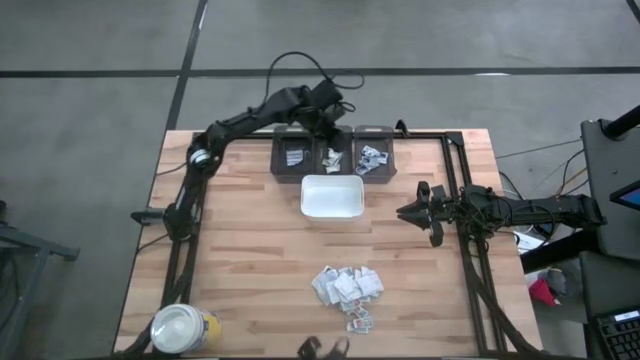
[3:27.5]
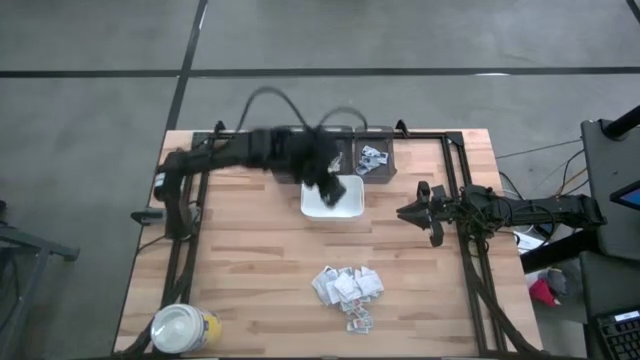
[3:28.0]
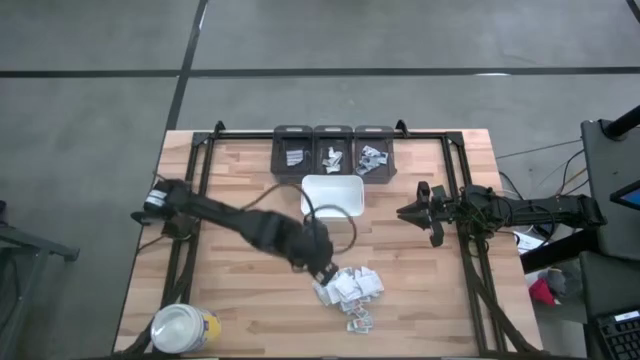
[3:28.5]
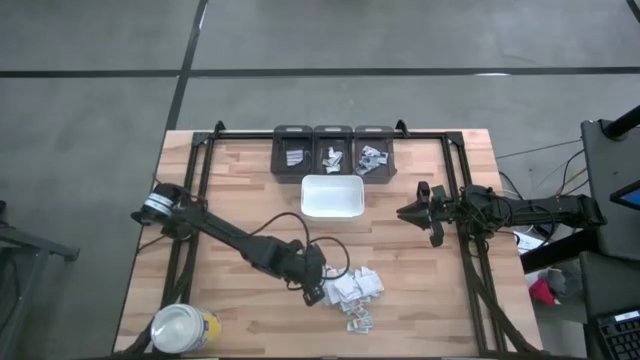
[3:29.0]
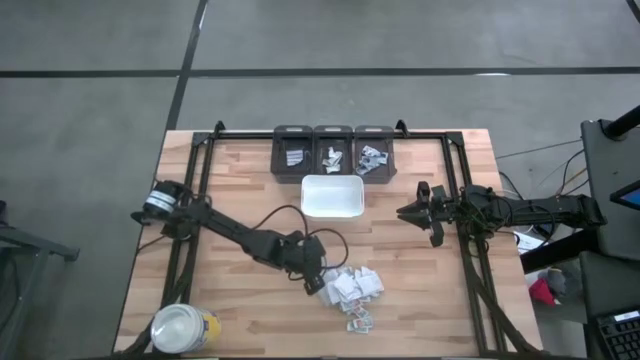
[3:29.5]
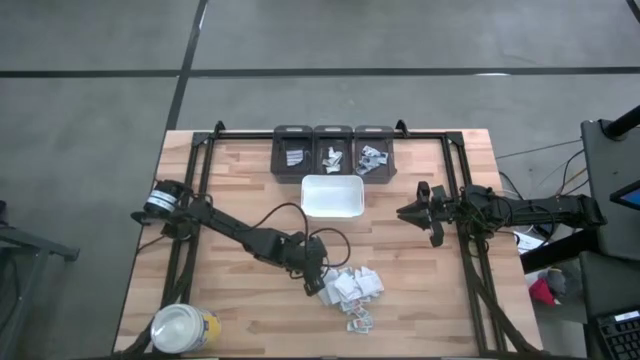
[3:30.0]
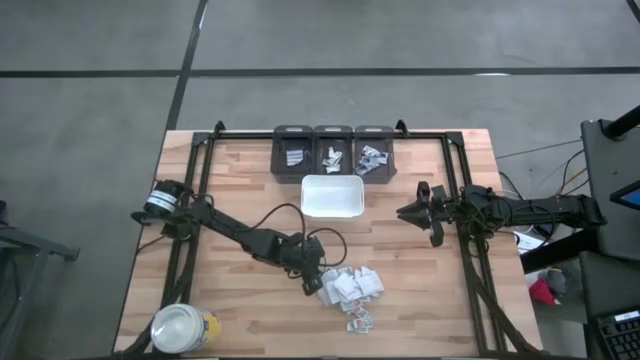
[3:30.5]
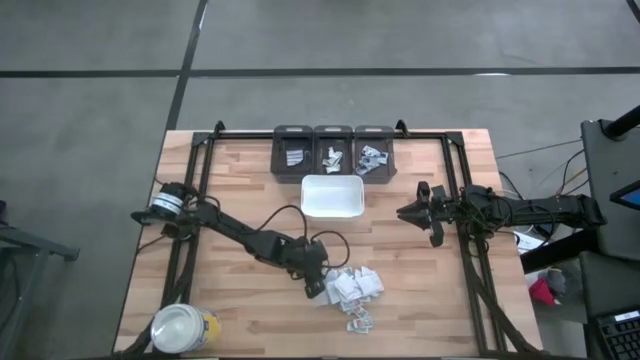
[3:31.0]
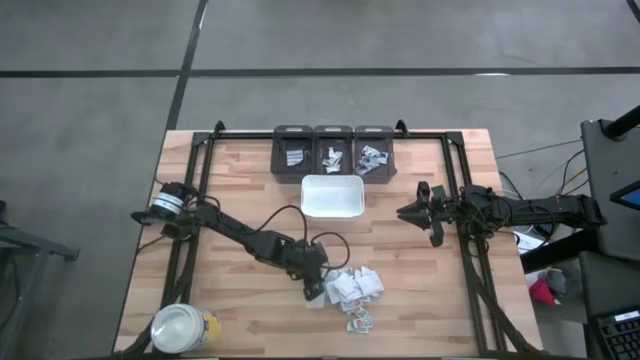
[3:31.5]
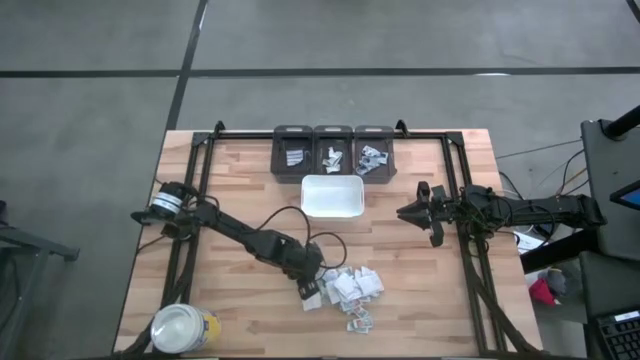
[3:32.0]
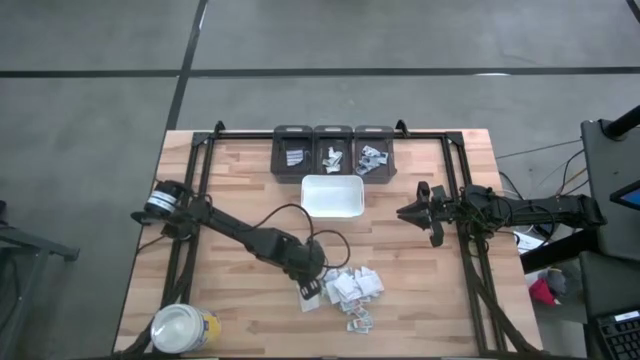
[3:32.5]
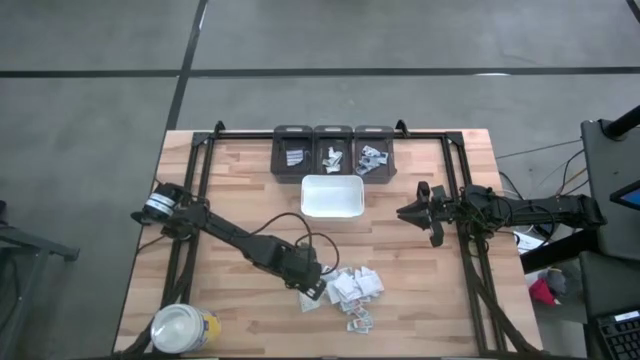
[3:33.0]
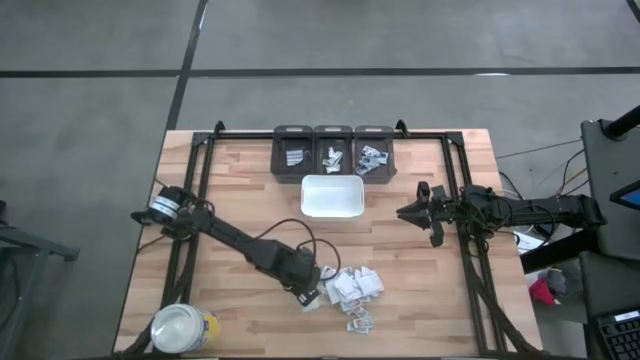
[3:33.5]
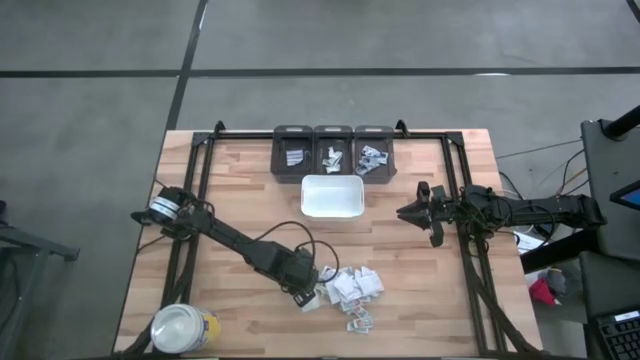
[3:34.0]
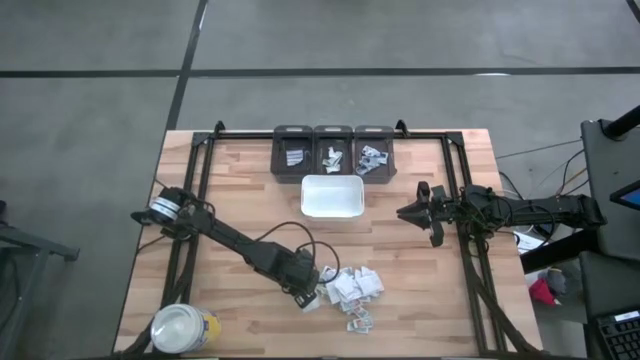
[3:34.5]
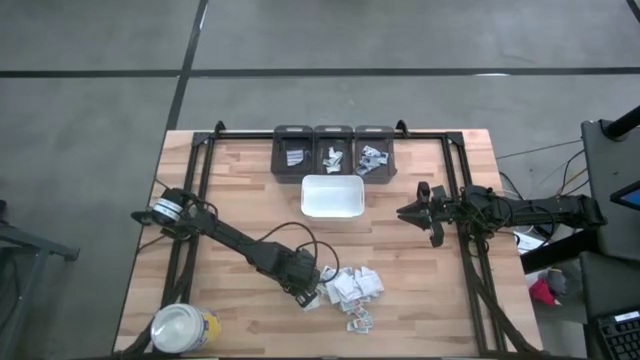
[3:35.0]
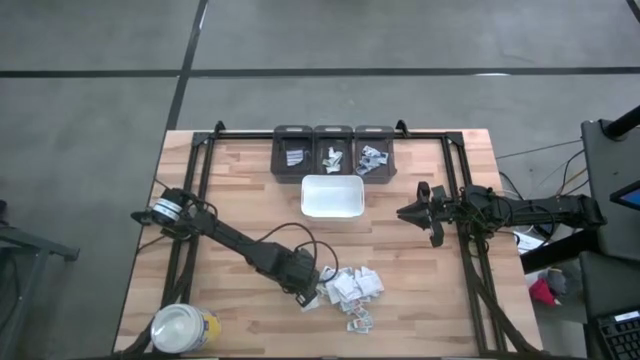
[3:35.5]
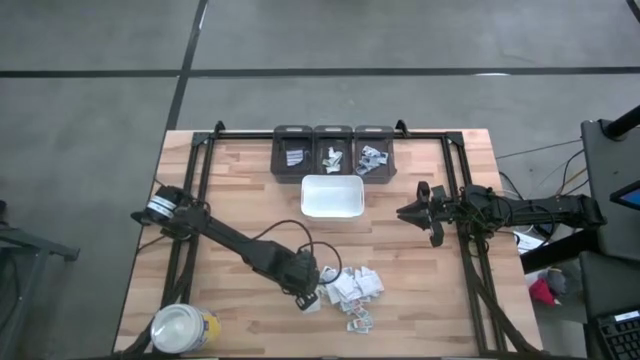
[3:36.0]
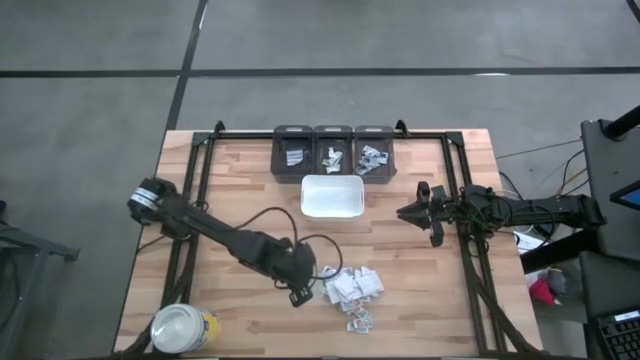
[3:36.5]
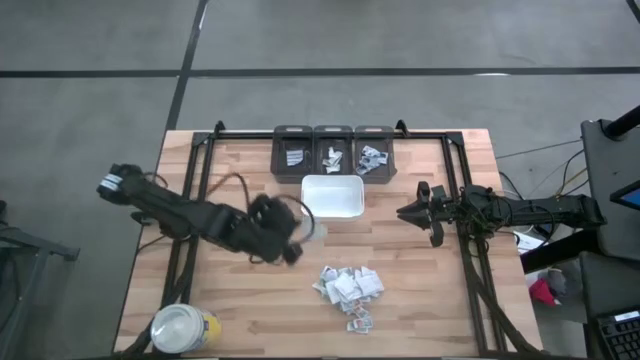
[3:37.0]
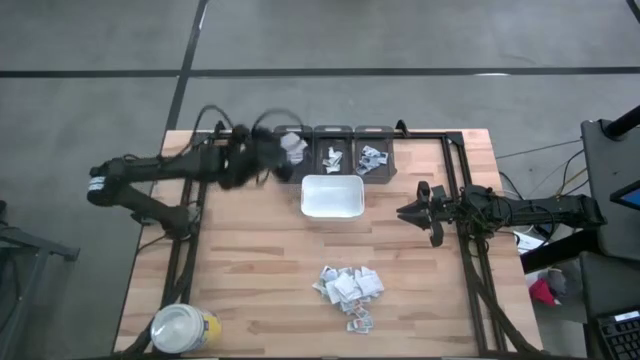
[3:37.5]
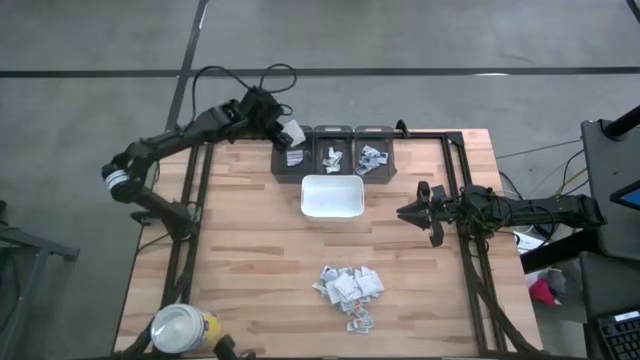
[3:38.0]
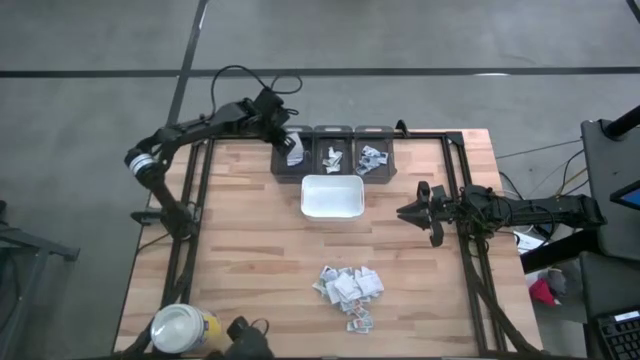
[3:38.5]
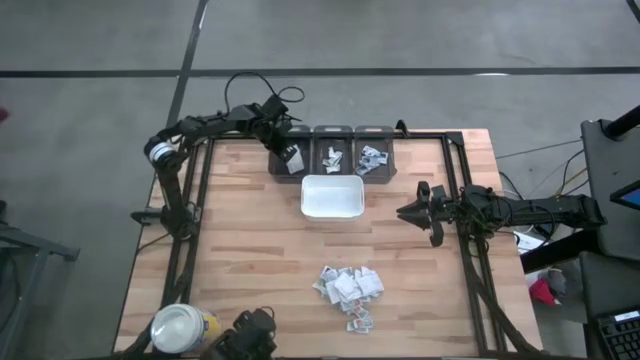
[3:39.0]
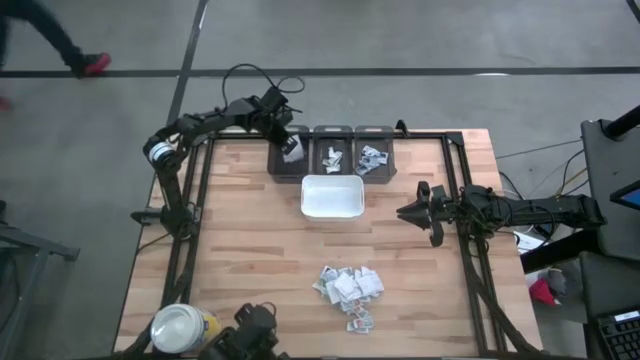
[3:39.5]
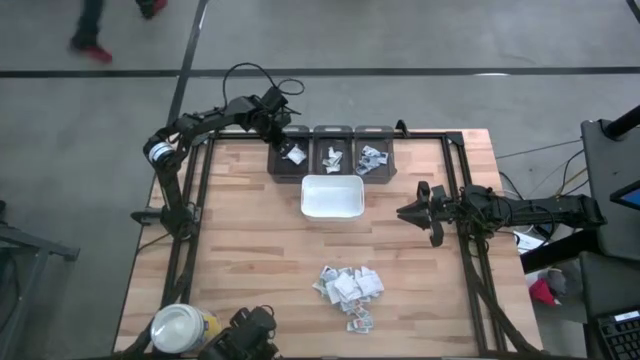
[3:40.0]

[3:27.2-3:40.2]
Task: Pick & Place First Aid Supplies
Put the white fingertip band aid into the left black bin

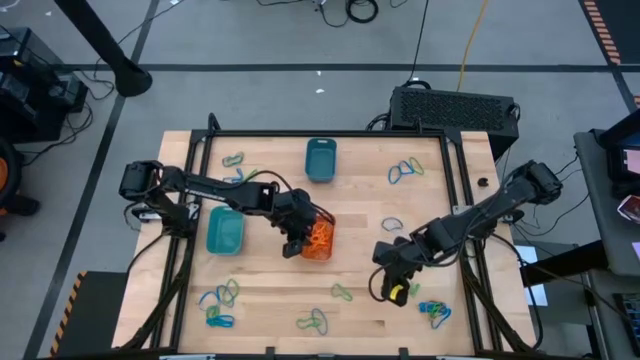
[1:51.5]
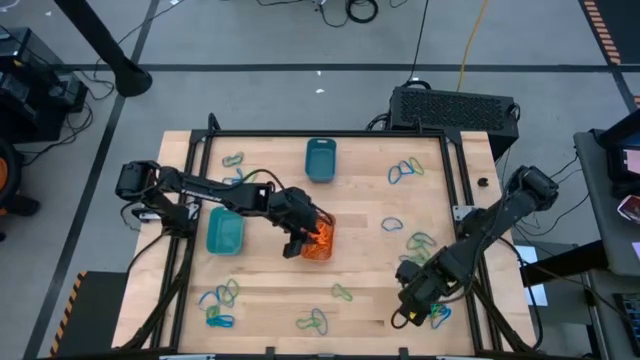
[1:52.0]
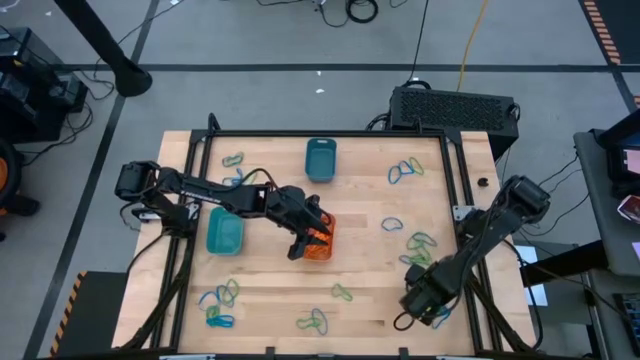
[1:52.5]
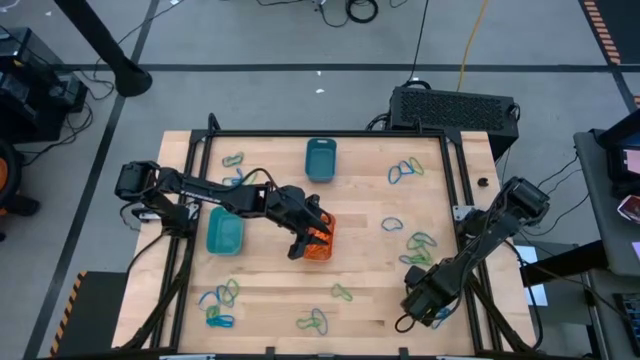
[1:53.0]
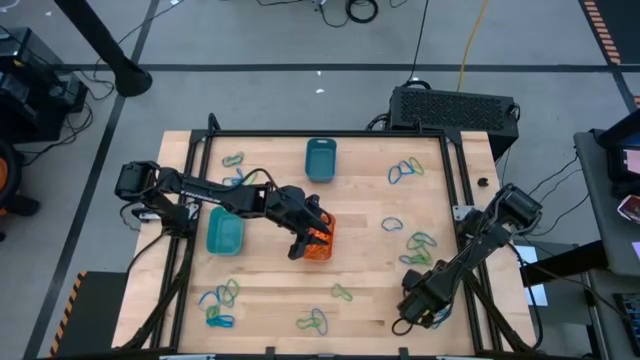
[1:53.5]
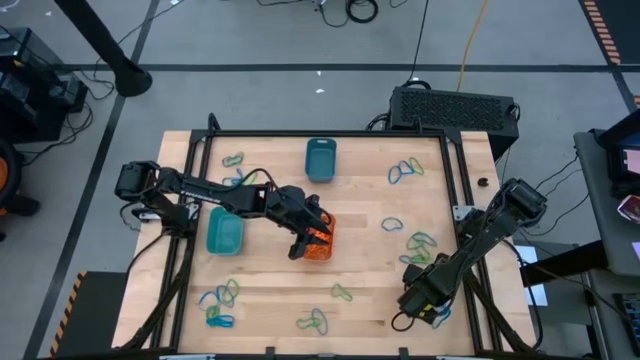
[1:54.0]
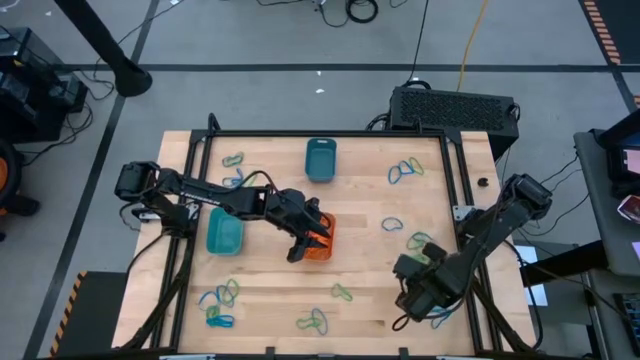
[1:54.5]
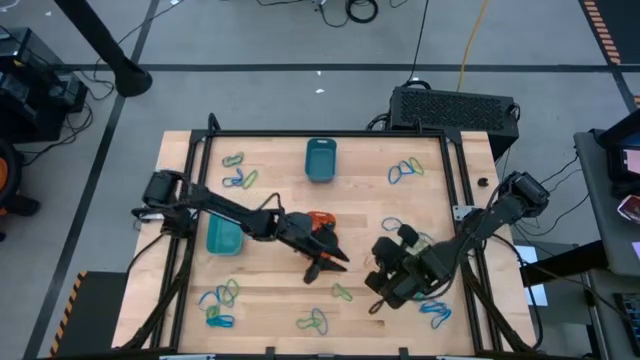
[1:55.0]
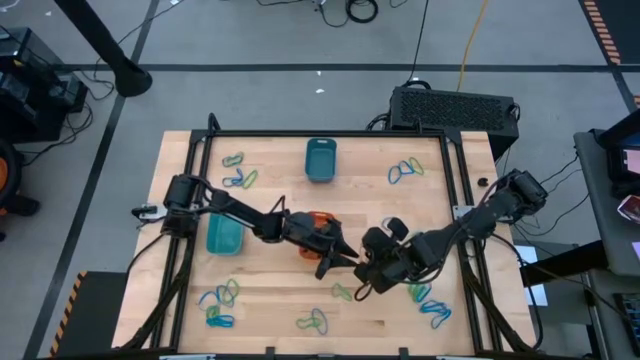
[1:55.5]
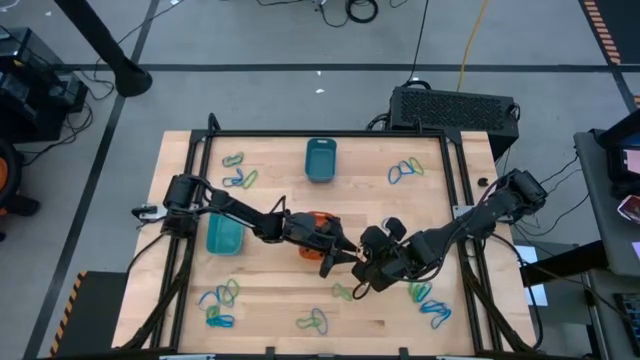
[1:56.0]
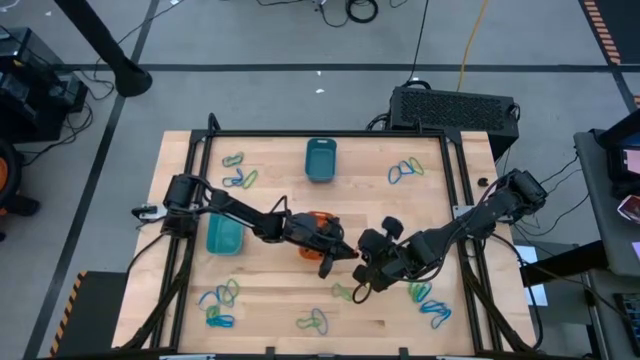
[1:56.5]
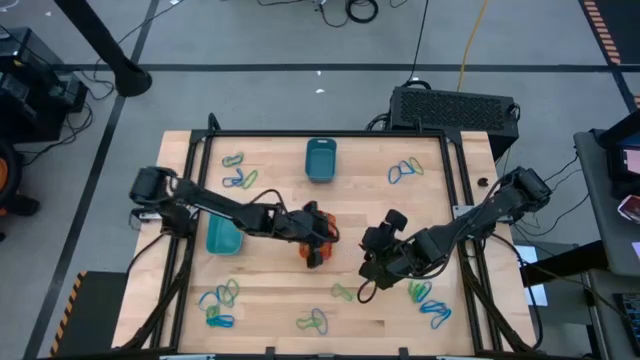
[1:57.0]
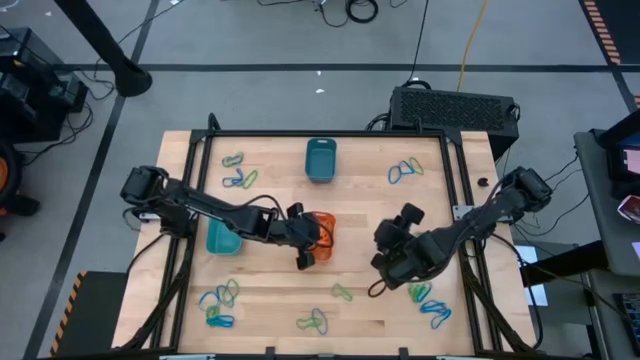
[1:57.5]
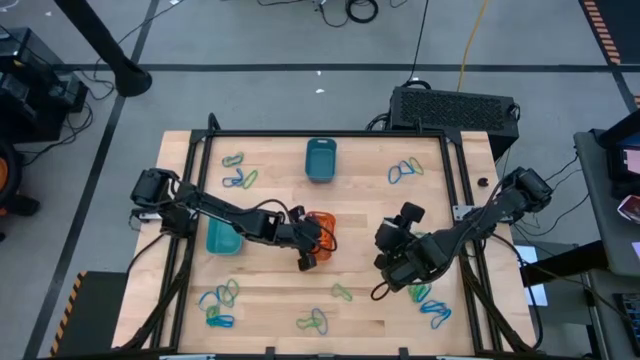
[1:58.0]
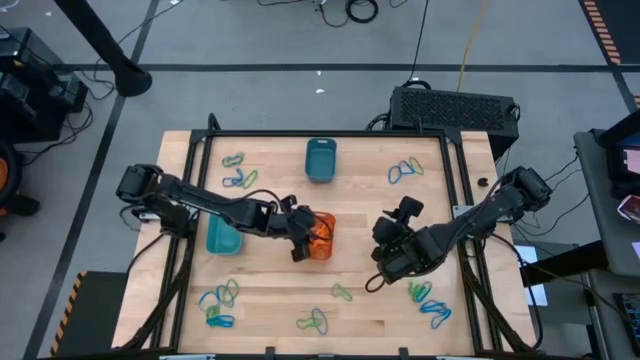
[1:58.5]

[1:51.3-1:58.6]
Task: Sort rubber bands into baskets
Put the orange rubber band into the orange bin
